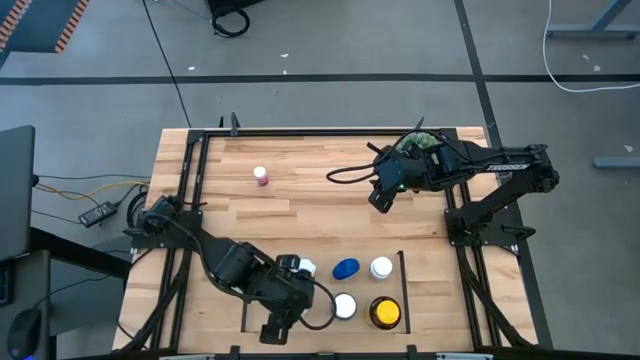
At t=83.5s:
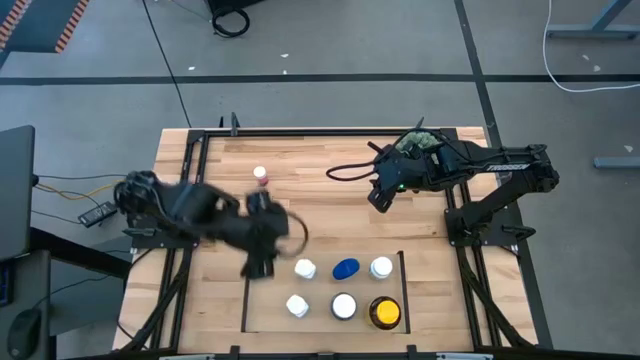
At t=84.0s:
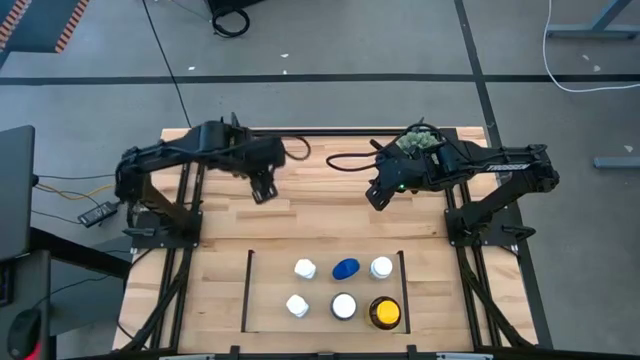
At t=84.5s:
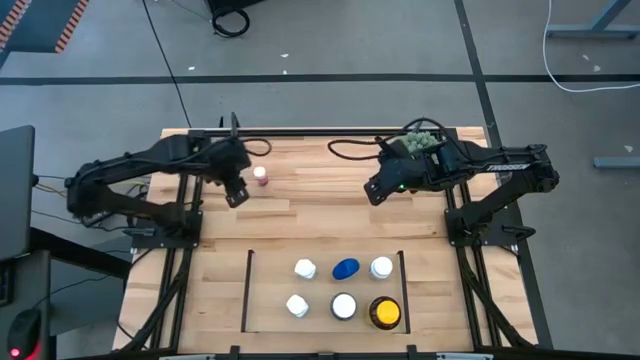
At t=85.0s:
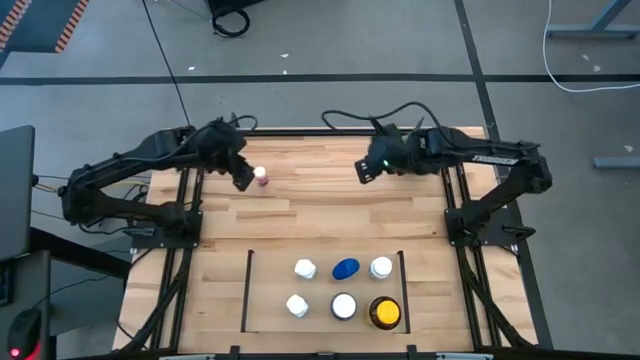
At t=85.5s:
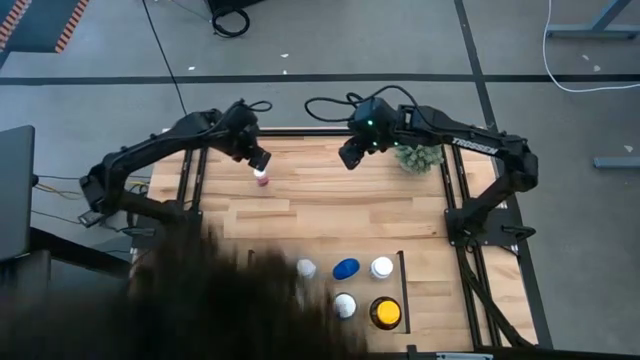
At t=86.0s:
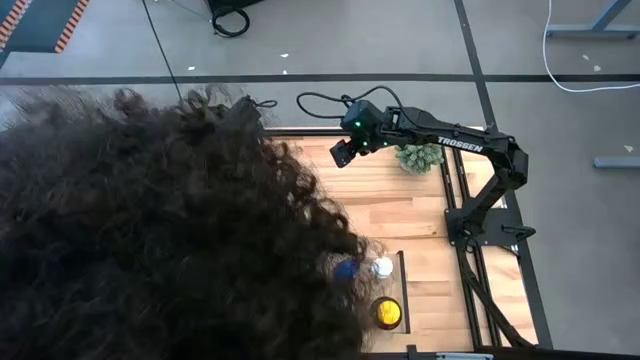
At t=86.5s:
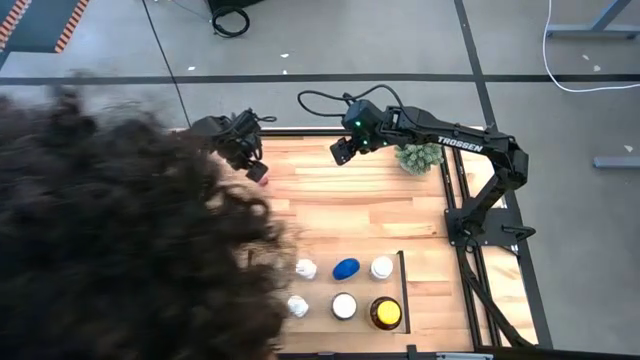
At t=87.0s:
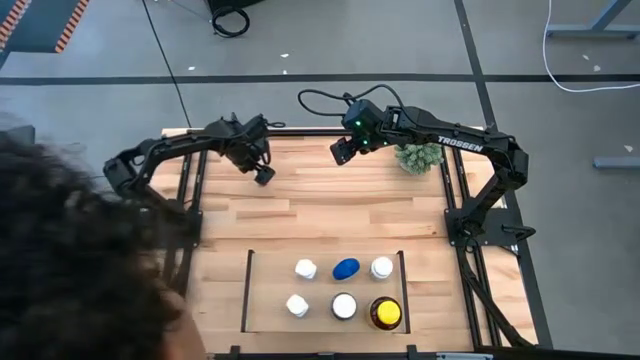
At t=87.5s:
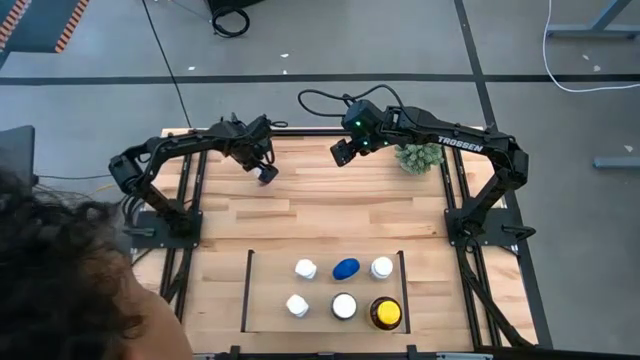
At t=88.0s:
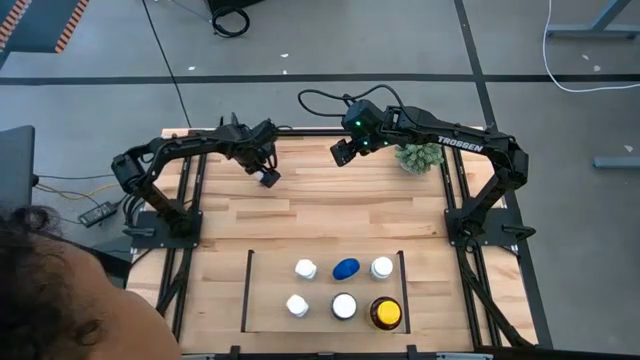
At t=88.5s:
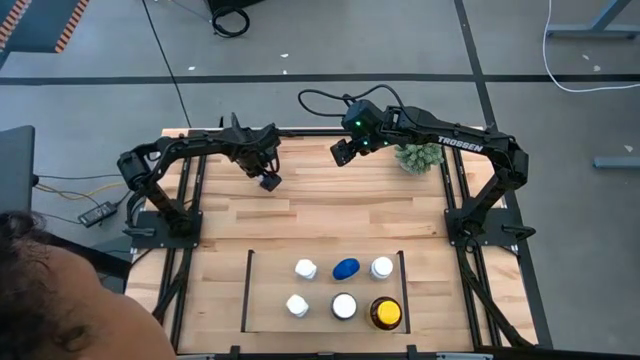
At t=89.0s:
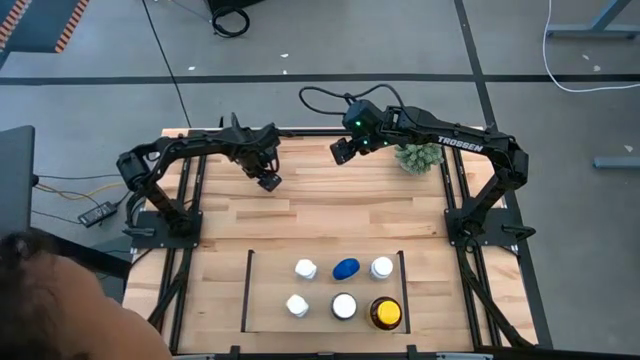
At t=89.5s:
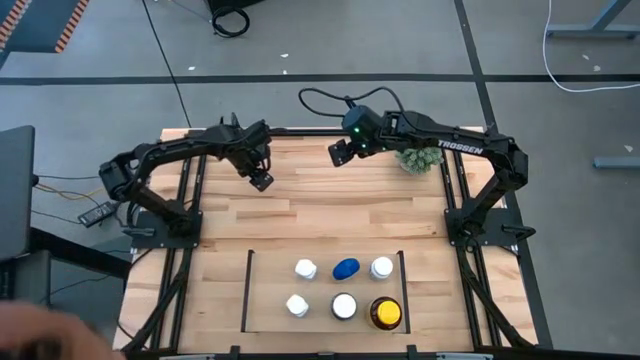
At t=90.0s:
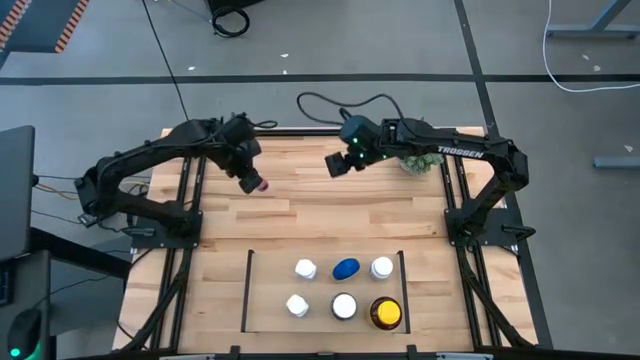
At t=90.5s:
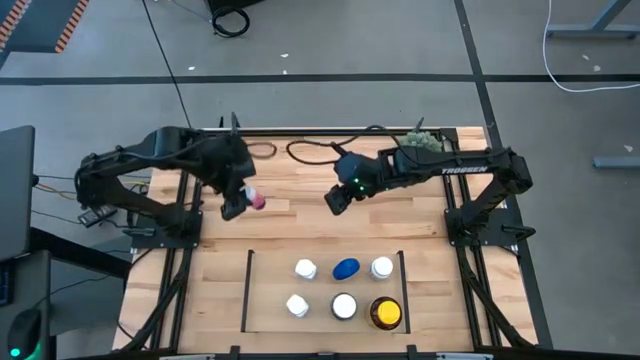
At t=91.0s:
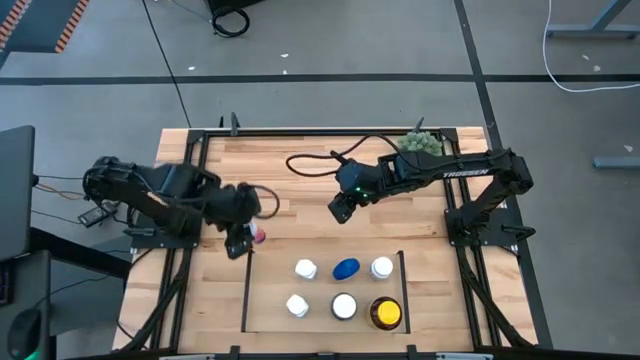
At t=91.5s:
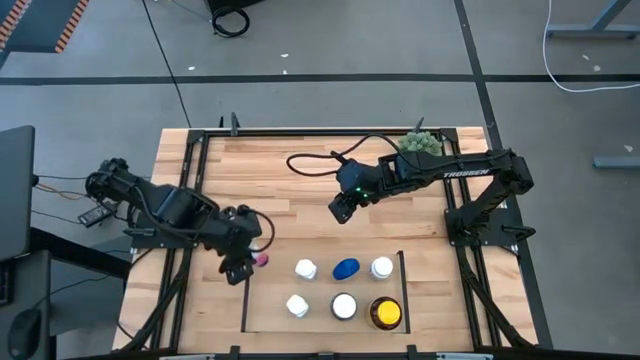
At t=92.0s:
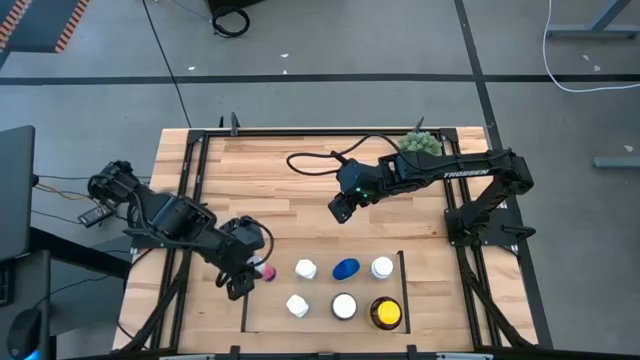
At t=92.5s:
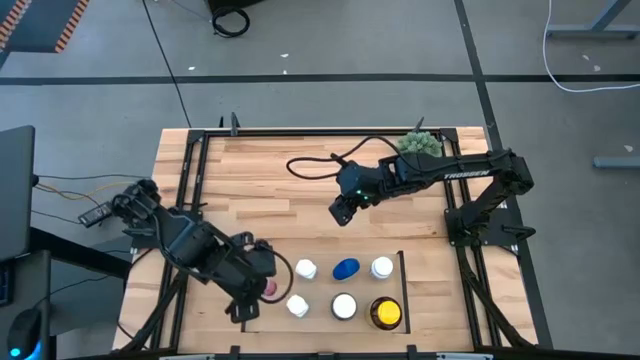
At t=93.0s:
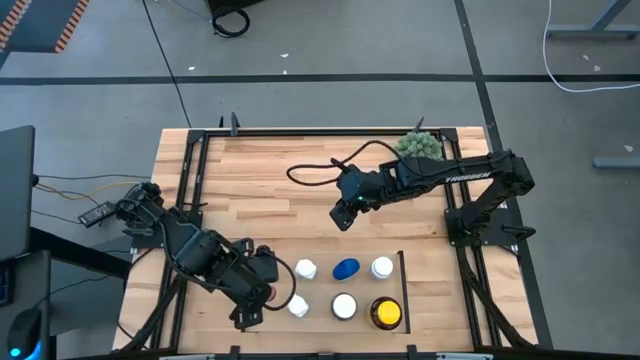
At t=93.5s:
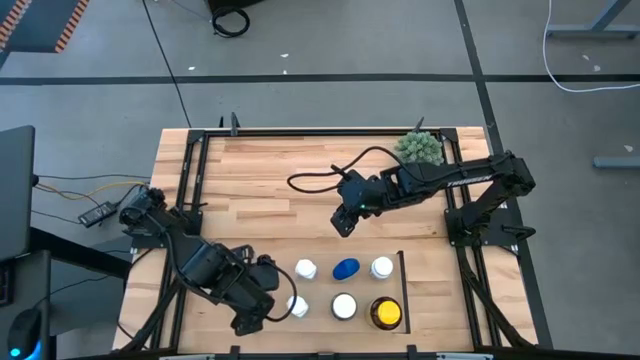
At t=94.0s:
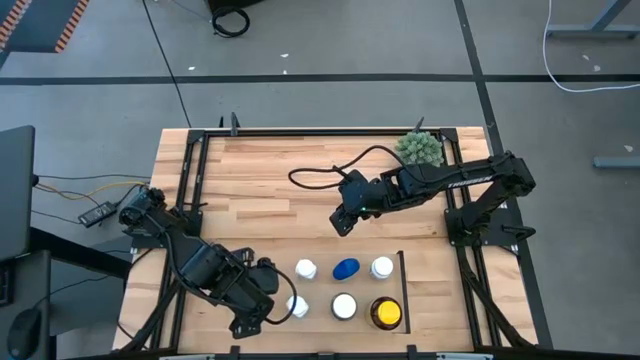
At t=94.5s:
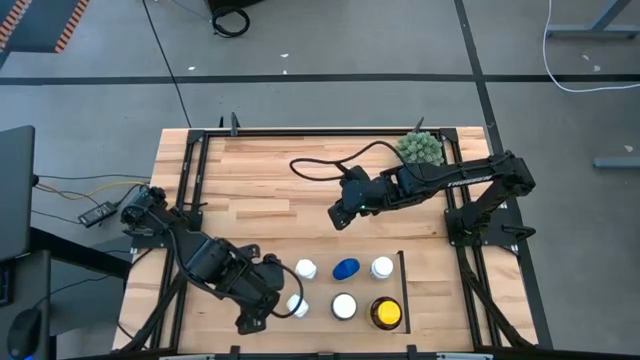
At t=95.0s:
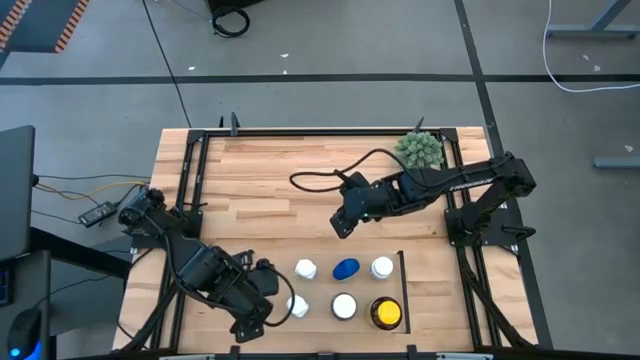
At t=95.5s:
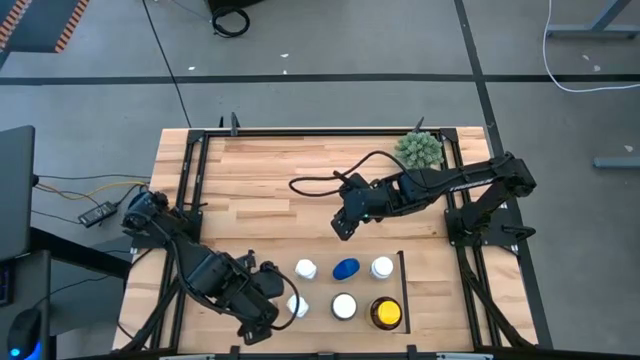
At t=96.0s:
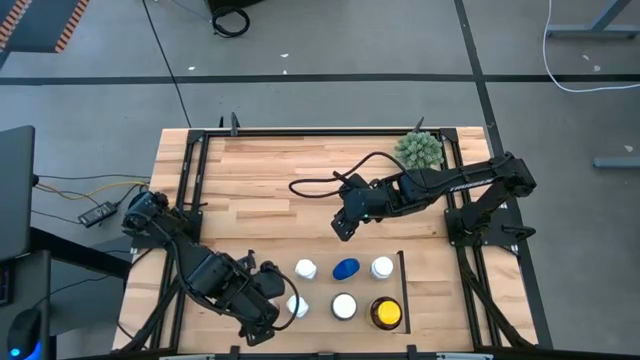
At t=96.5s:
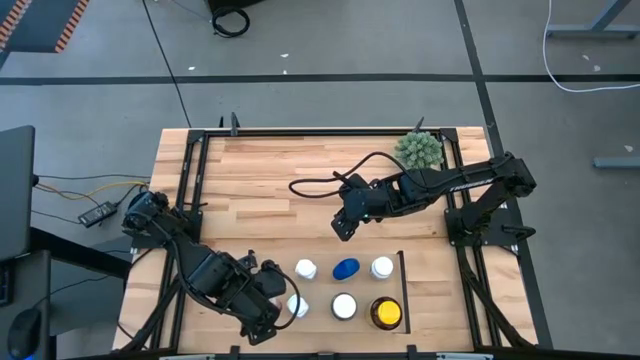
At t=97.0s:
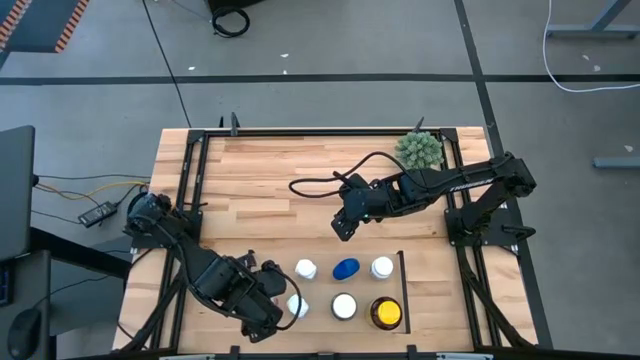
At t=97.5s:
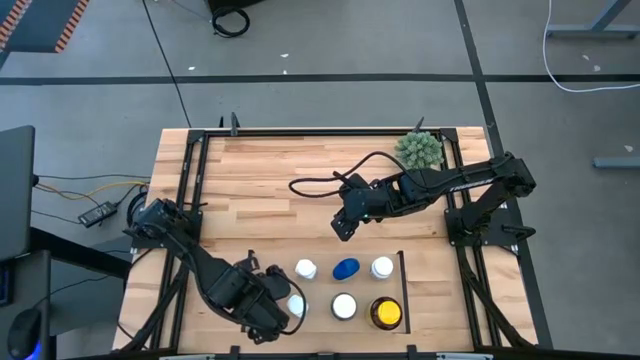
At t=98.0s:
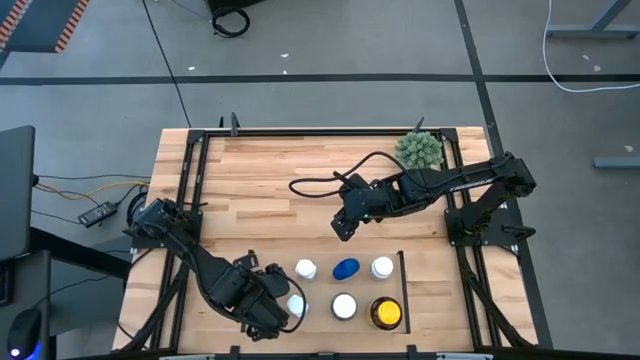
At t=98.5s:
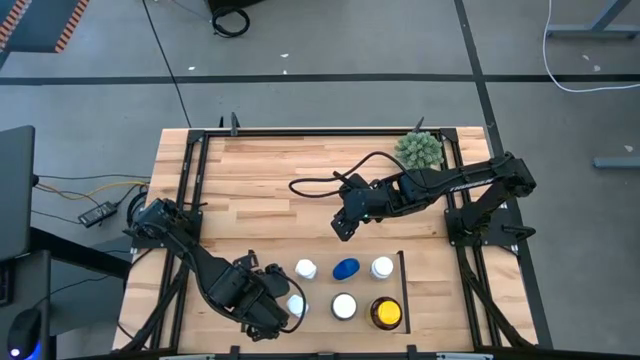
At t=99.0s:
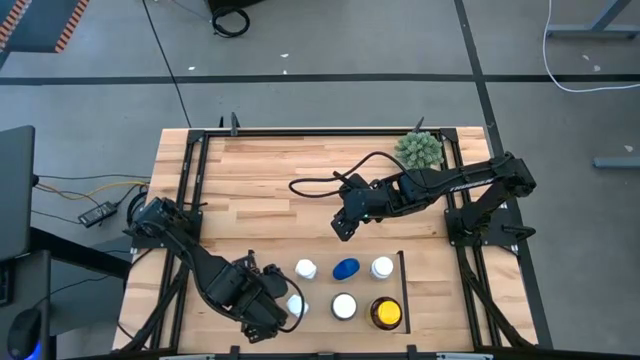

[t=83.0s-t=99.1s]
Task: Pick and place medicine bottles onto shelf by color
Put the pink medicine bottle on the shelf

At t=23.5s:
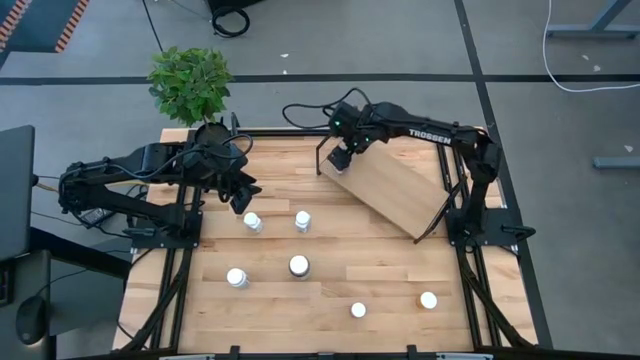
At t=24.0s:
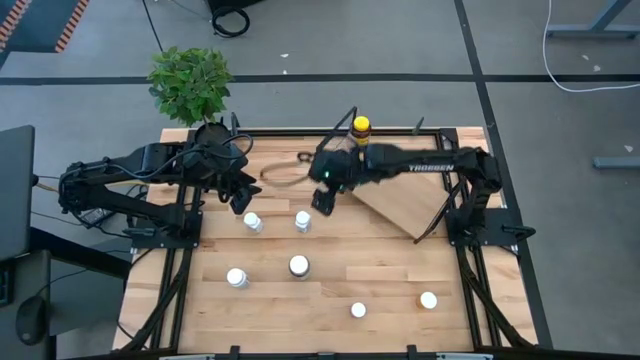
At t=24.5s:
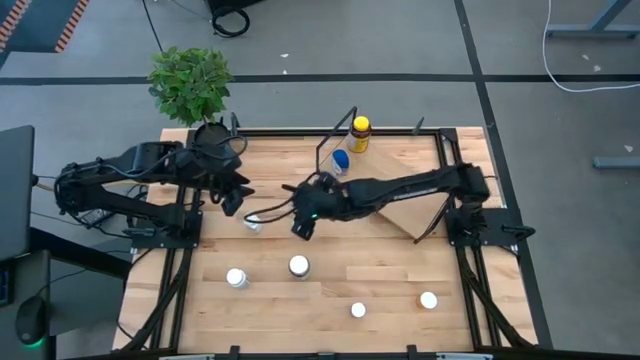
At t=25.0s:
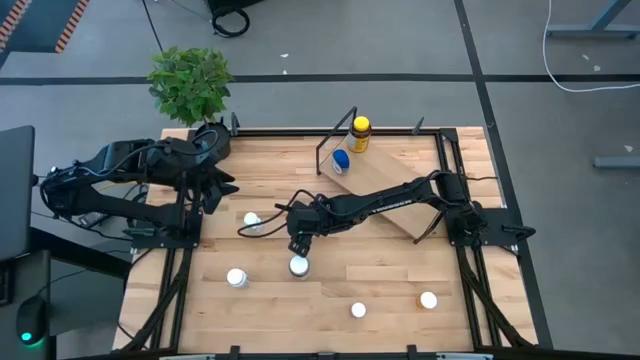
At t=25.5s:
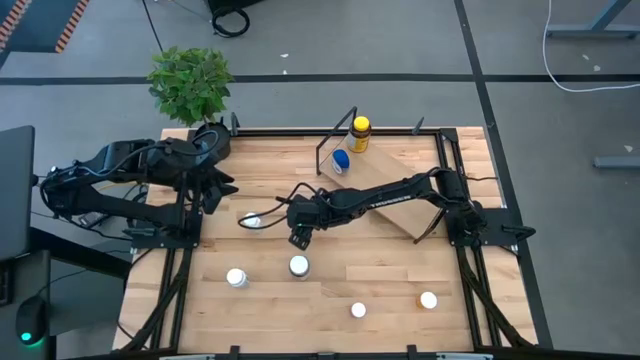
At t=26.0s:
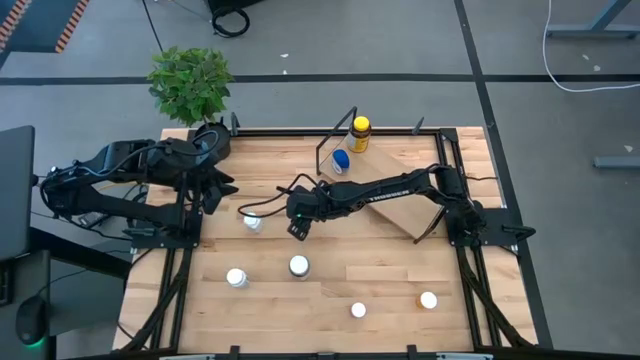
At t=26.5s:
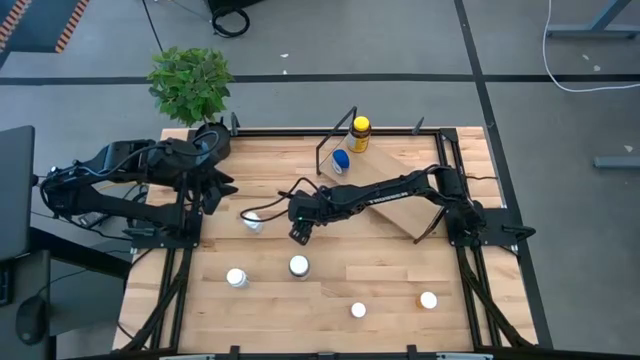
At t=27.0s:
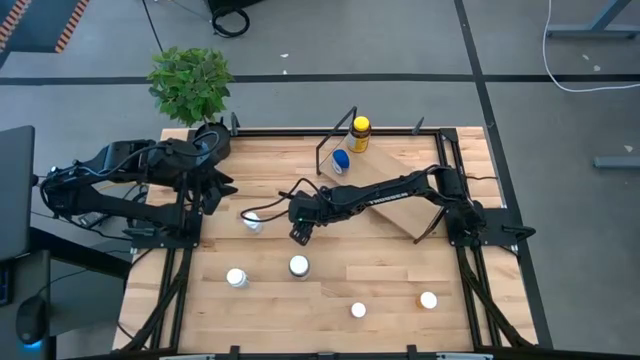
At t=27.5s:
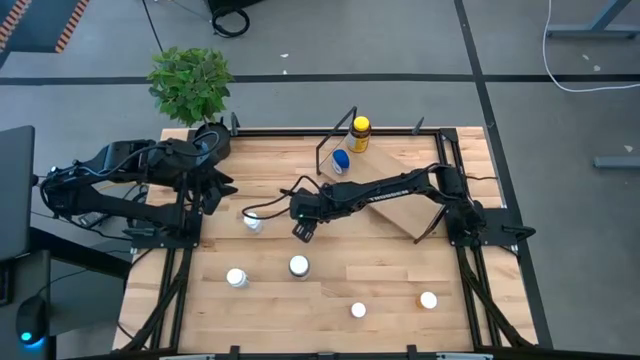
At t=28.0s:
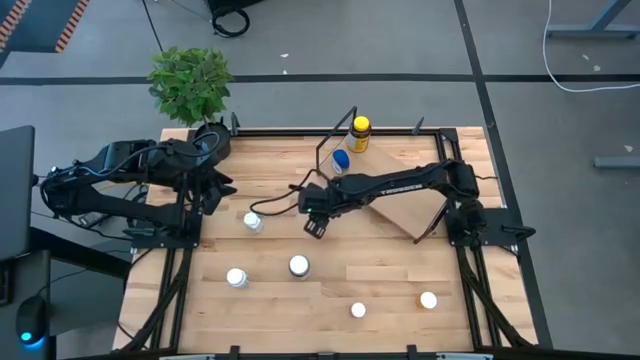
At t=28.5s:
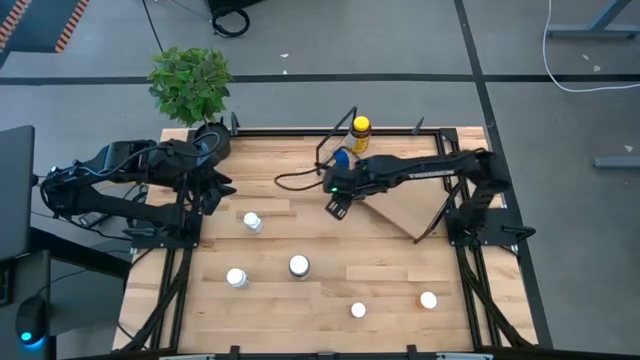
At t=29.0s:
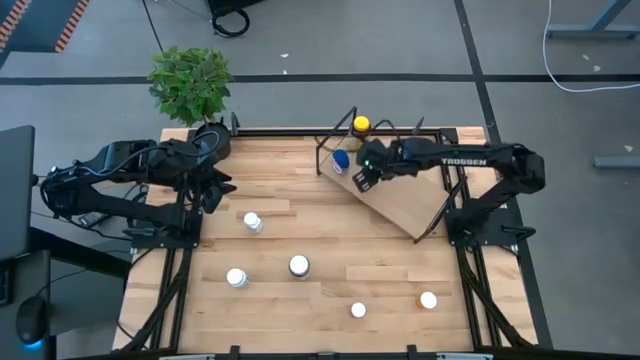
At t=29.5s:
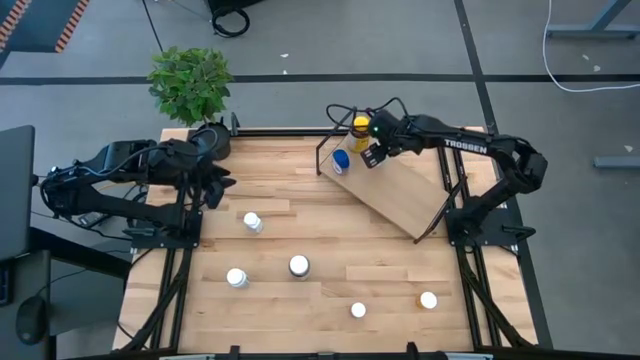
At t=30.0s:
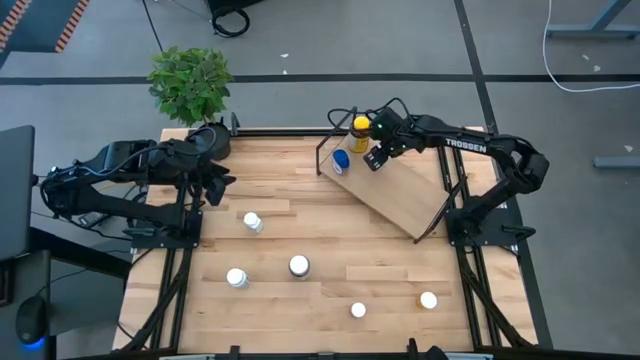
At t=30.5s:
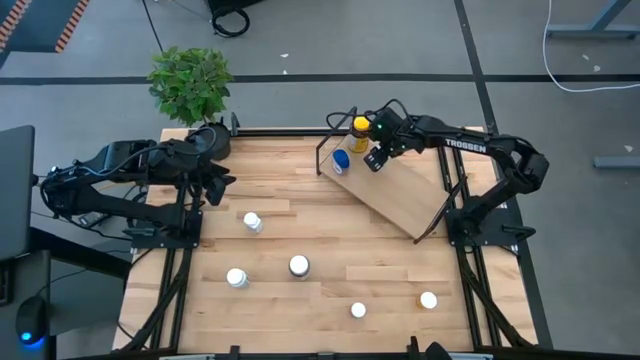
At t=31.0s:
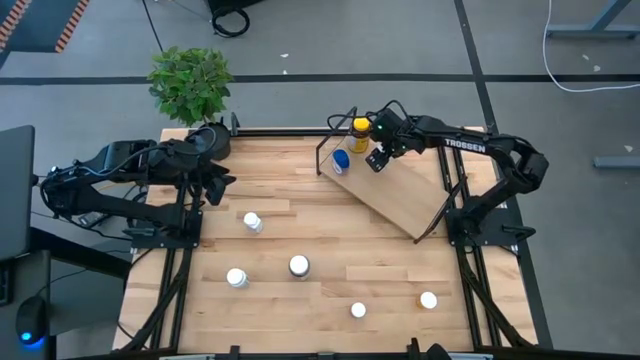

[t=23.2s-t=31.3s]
Task: Pick and place medicine bottles onto shelf by color
Put the top white and blue medicine bottle on the shelf
